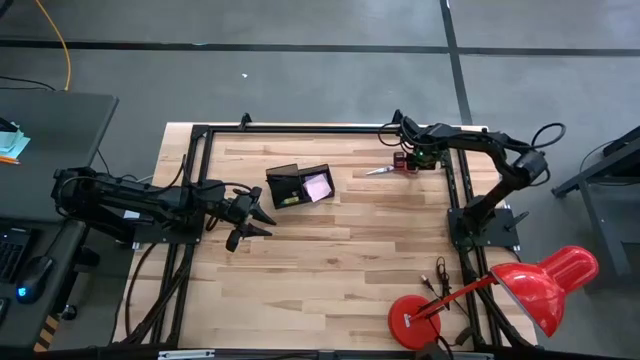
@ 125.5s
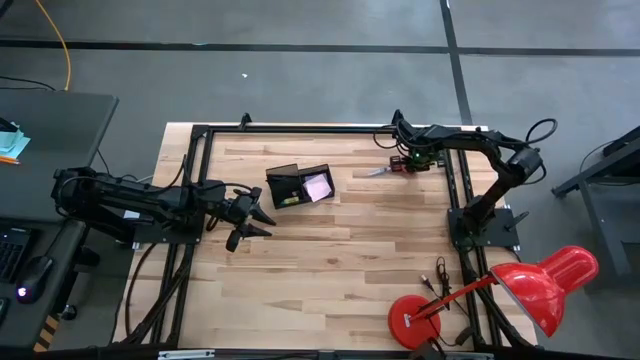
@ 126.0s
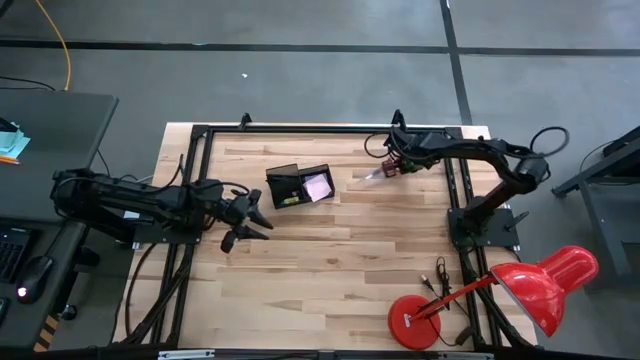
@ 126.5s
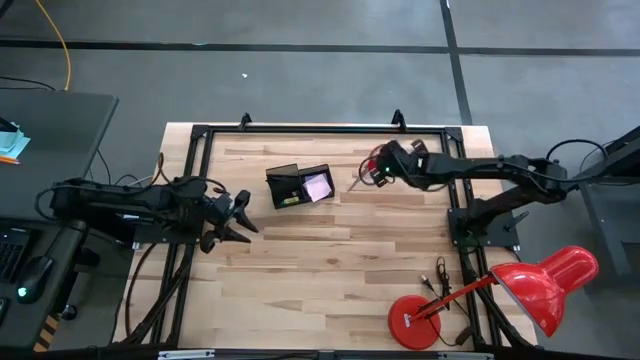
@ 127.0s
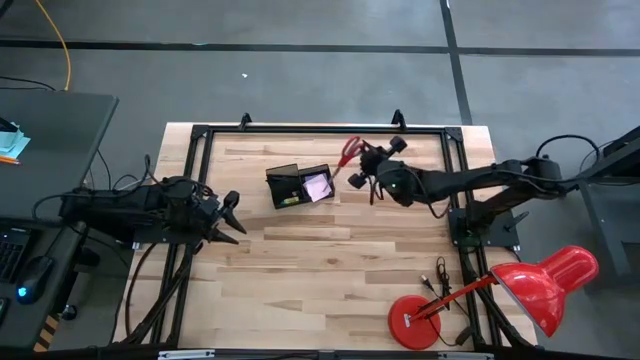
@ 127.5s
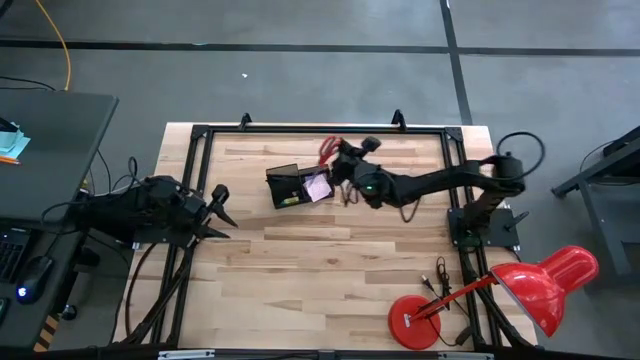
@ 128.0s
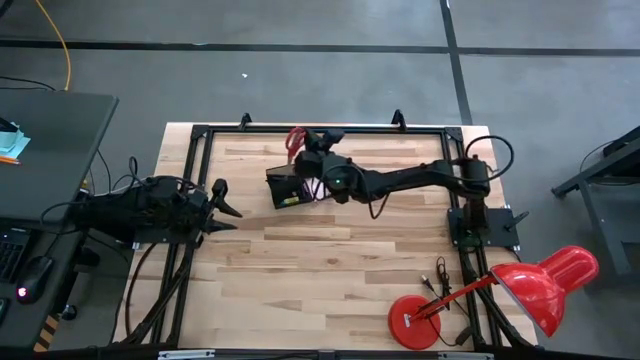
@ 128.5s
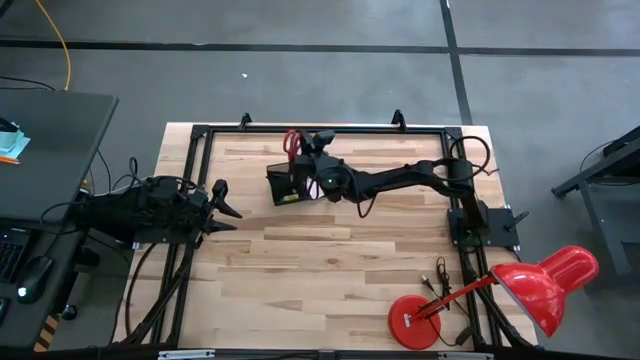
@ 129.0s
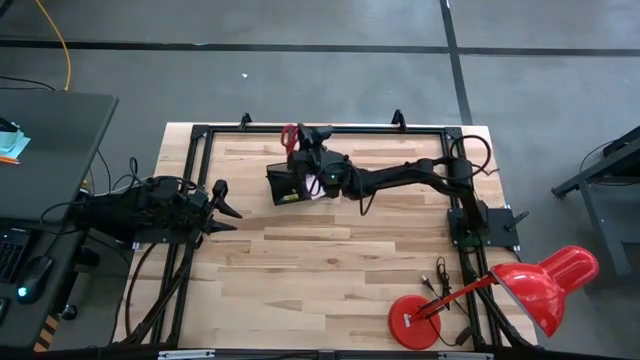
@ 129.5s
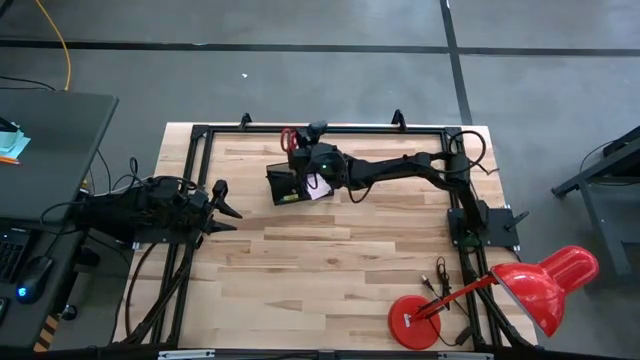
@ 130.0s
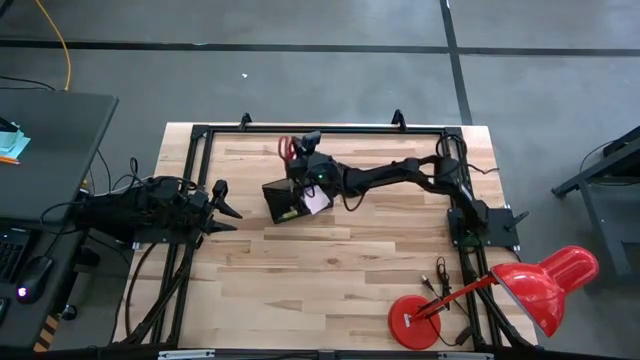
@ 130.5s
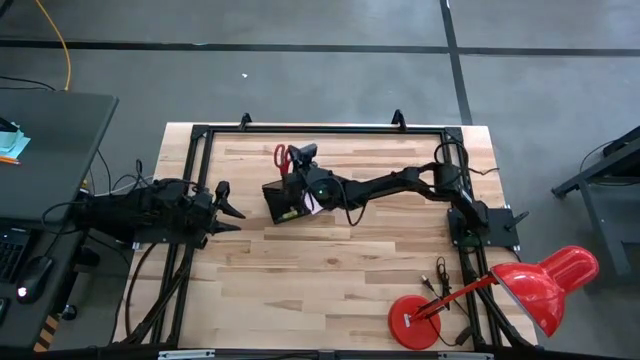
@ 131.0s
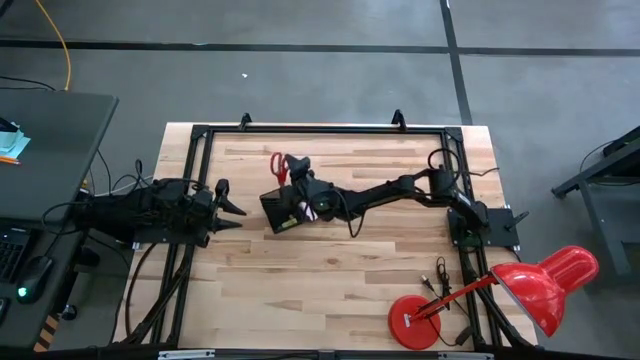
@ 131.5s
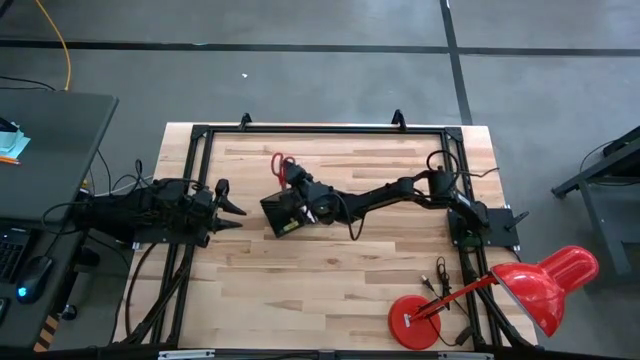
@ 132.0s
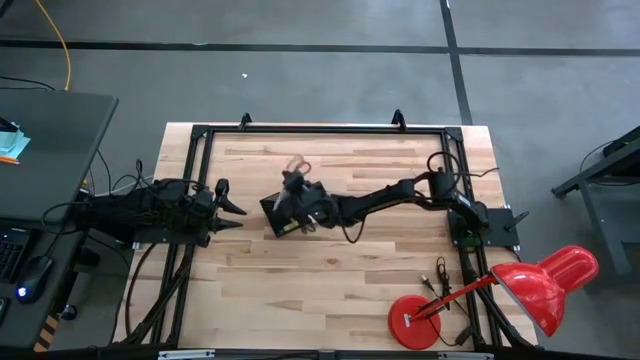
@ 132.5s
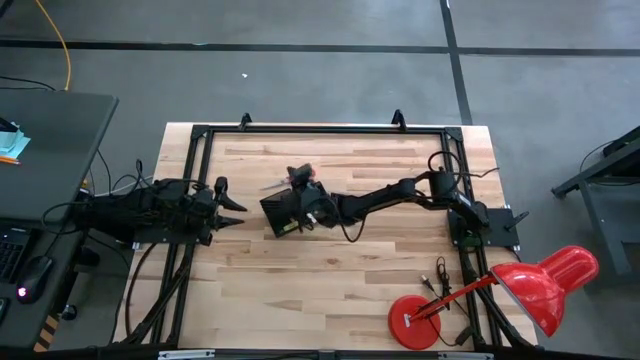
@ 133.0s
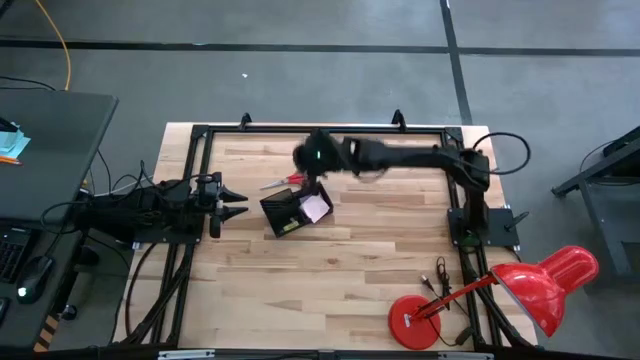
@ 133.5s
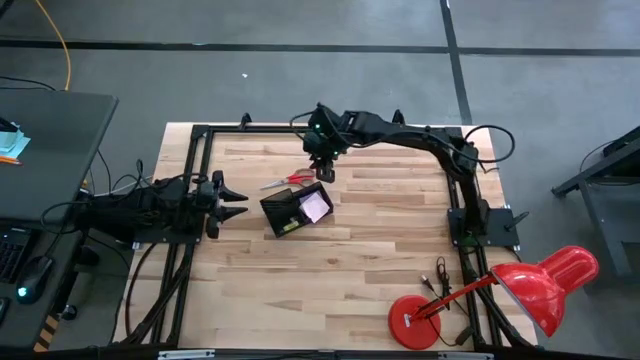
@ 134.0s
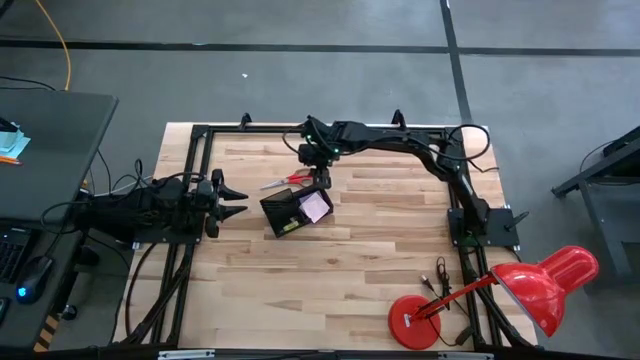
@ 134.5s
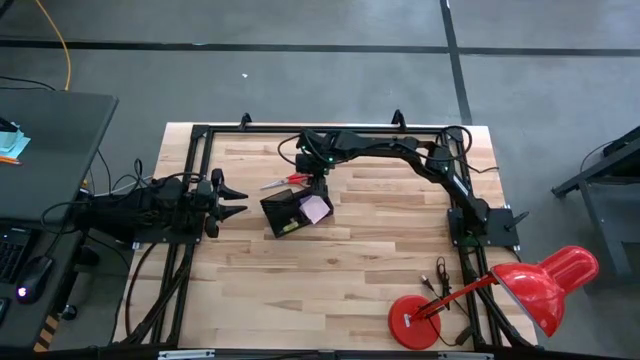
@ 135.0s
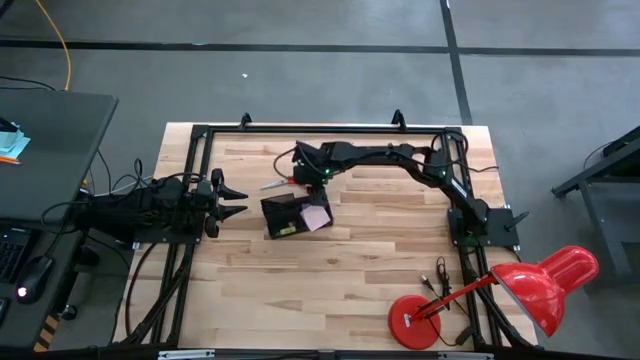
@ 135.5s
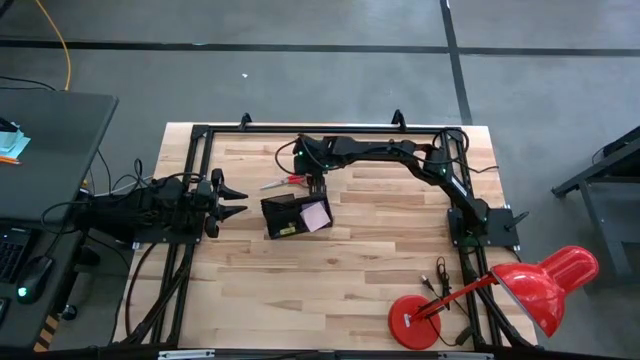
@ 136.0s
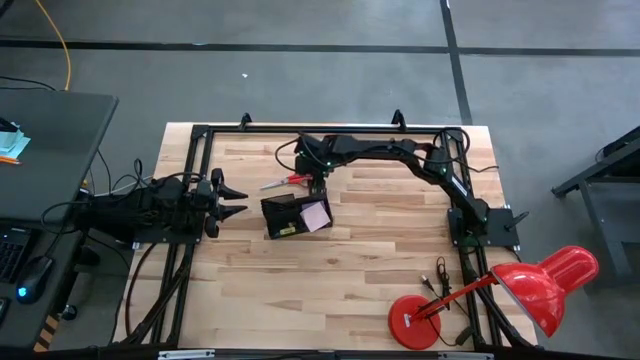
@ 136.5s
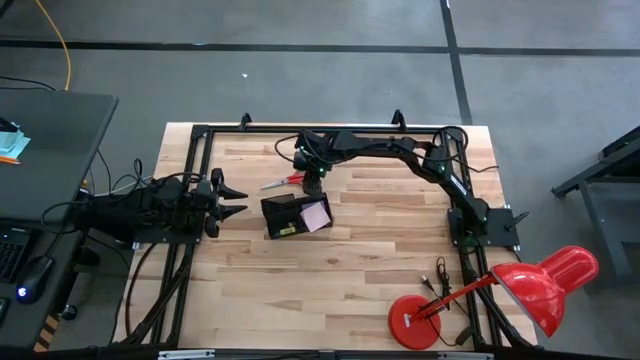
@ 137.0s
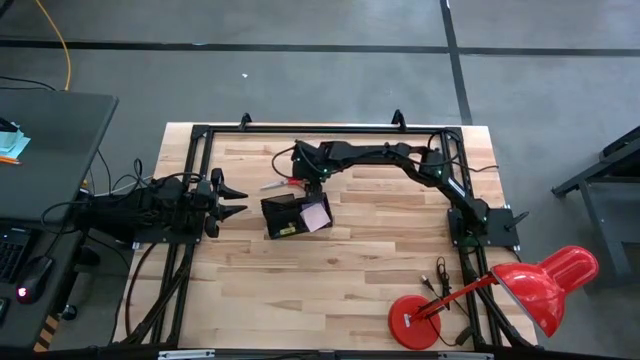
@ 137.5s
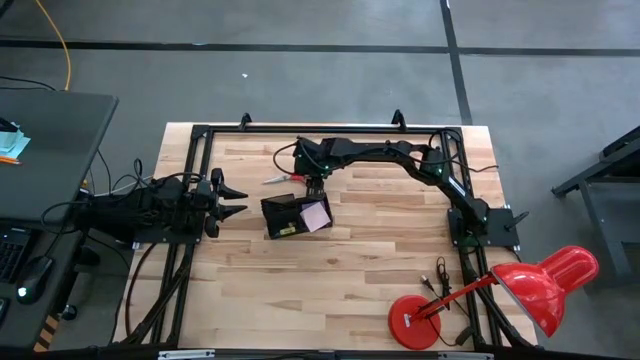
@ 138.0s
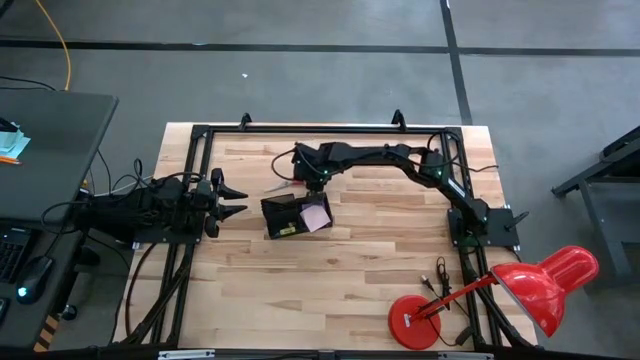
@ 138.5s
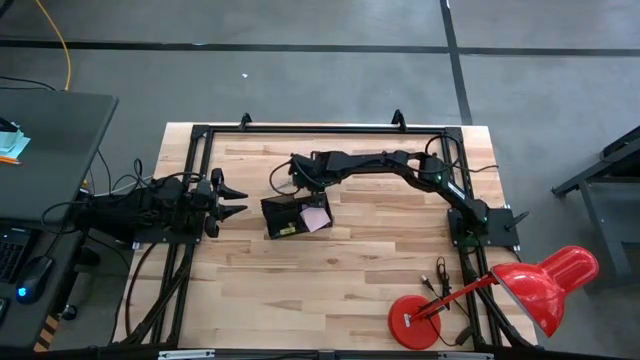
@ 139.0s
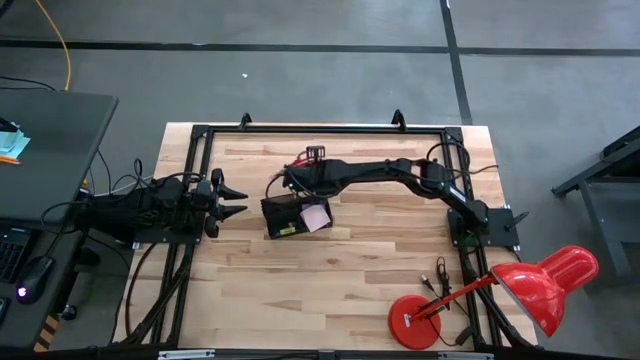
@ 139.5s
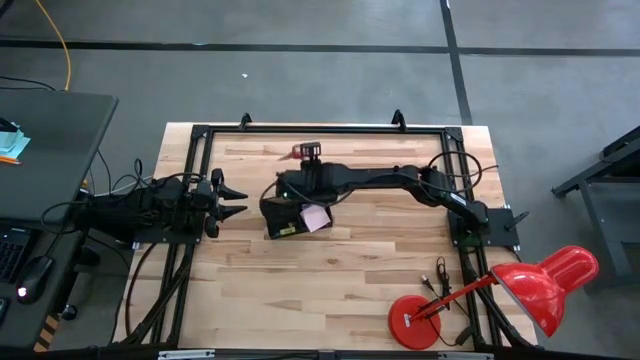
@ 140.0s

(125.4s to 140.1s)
Task: Pick and place office supplies into organizer
Put the red scissors into the black desk organizer

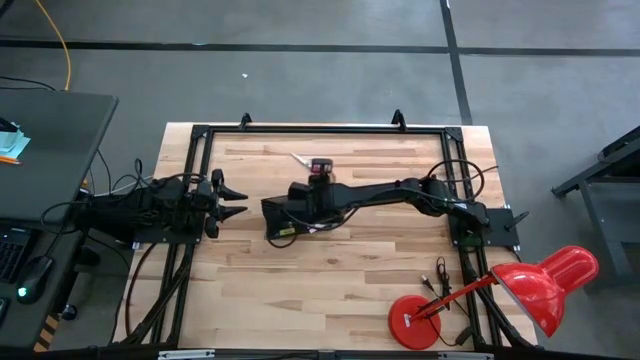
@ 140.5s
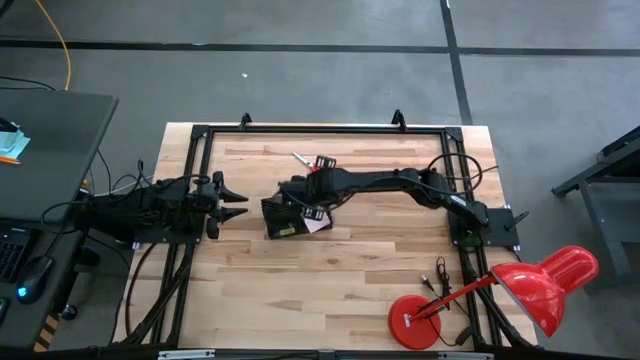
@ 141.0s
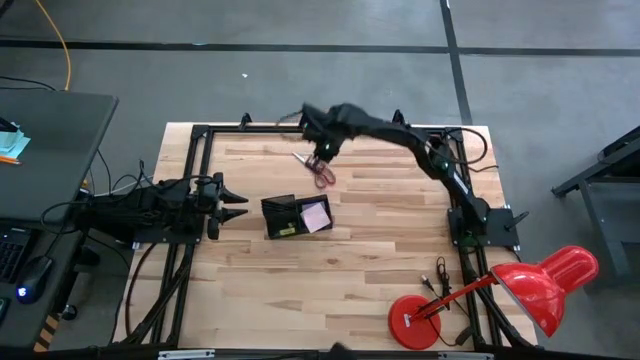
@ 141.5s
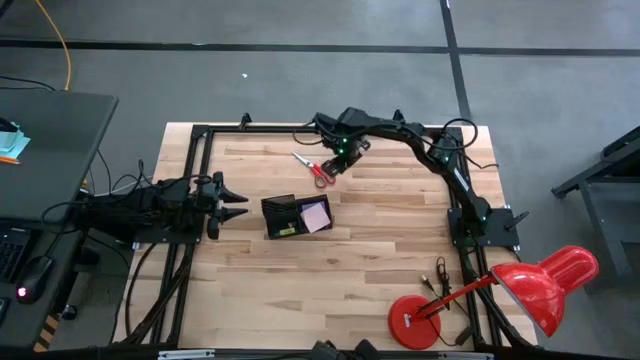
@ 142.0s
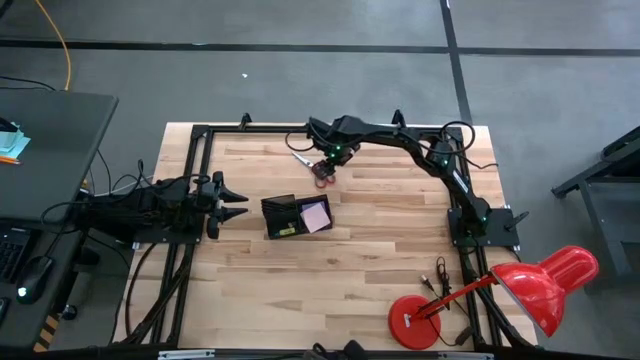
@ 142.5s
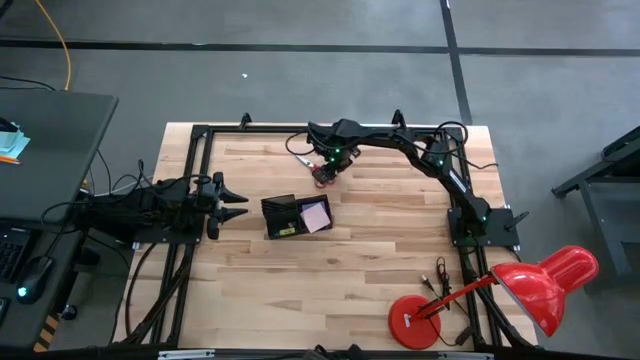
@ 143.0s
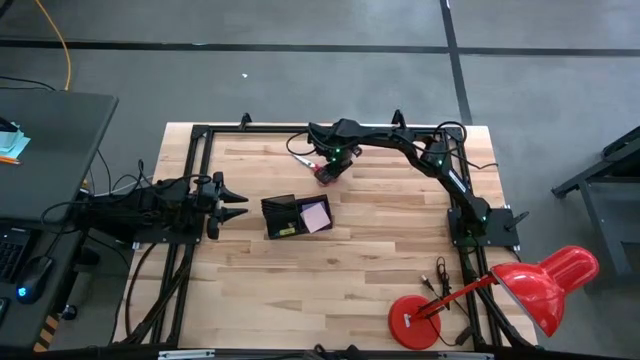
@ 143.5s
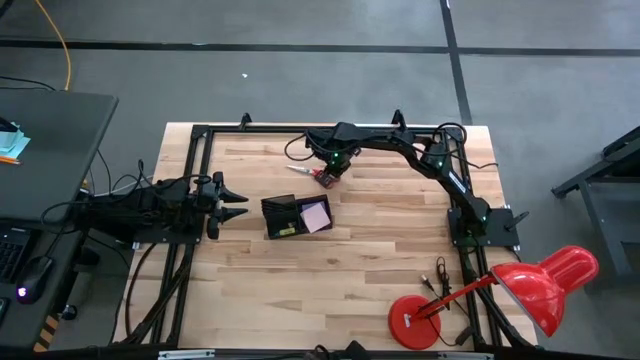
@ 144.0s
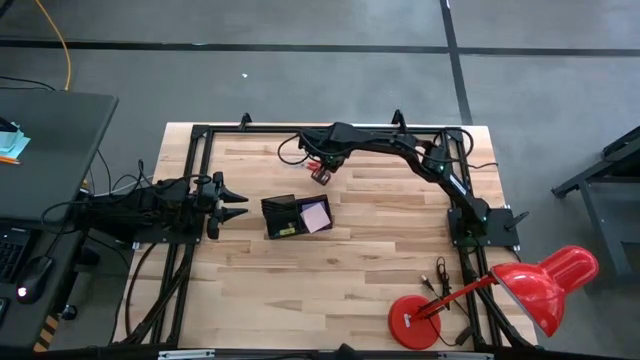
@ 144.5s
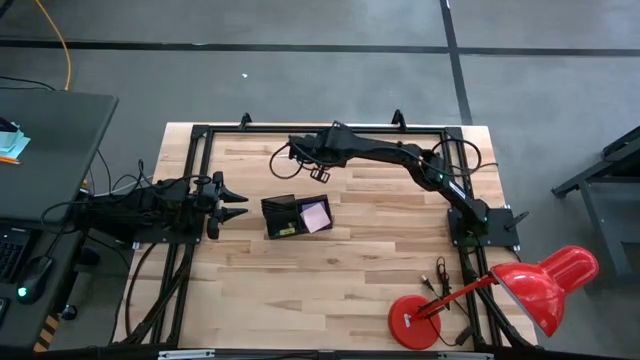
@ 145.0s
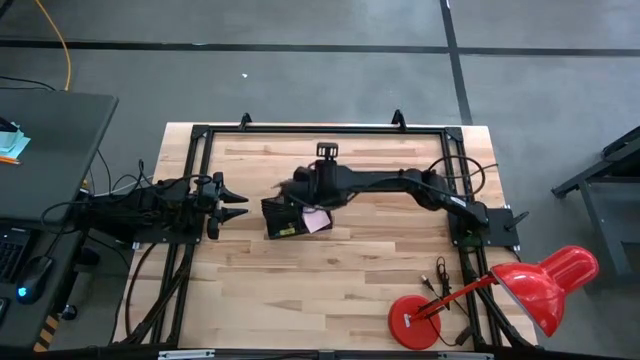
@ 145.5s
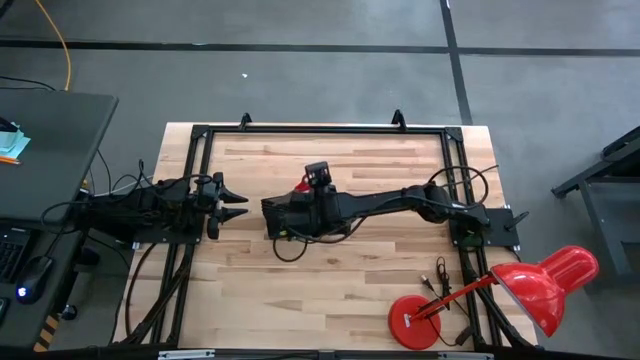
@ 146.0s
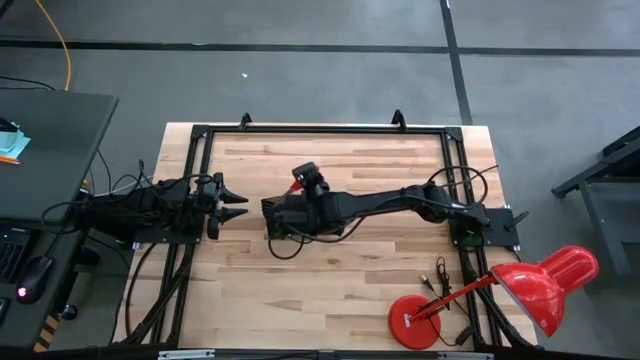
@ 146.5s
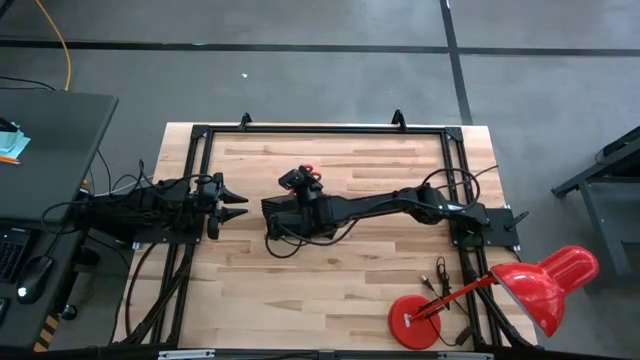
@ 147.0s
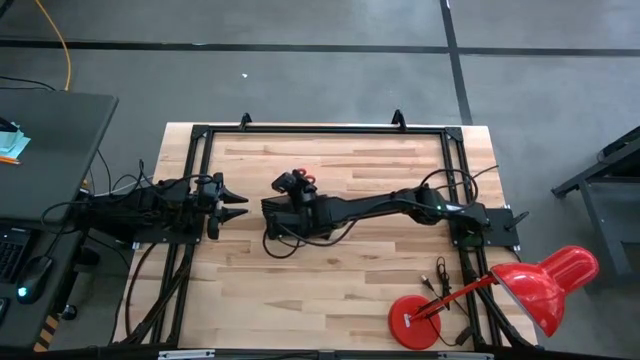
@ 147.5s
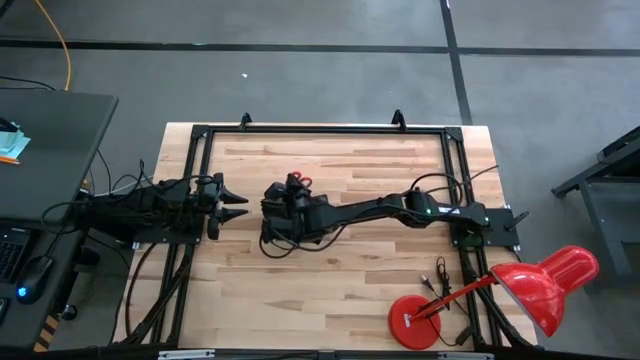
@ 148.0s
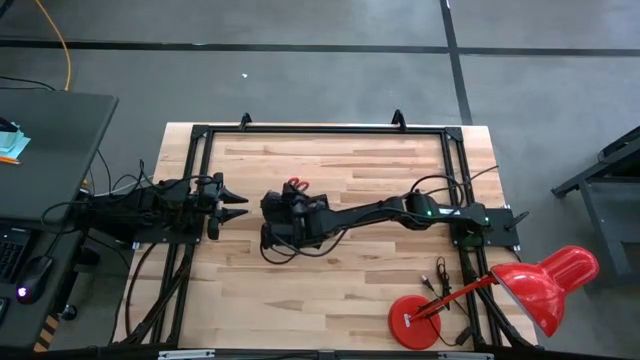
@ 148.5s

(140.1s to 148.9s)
Put the red scissors into the black desk organizer
